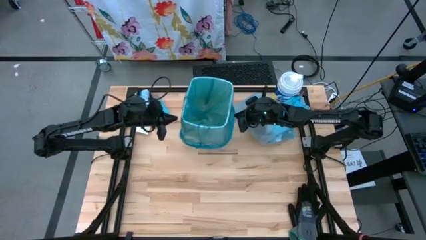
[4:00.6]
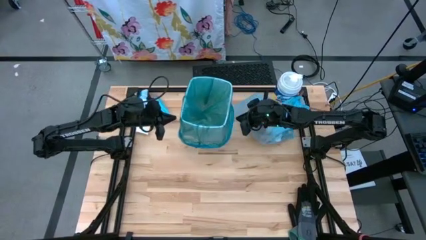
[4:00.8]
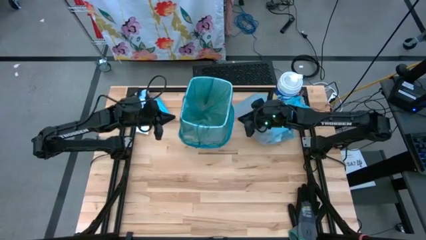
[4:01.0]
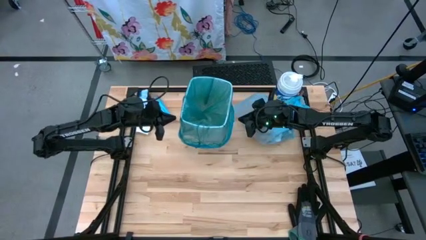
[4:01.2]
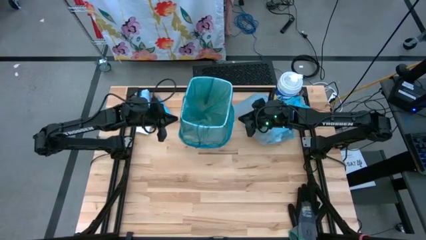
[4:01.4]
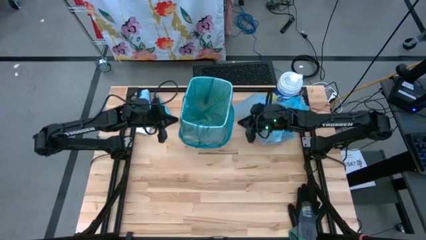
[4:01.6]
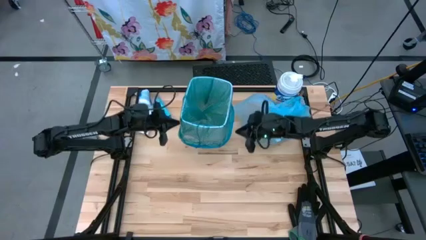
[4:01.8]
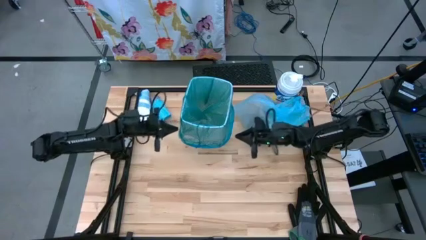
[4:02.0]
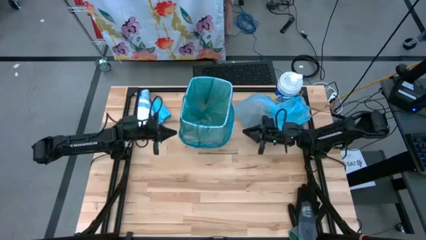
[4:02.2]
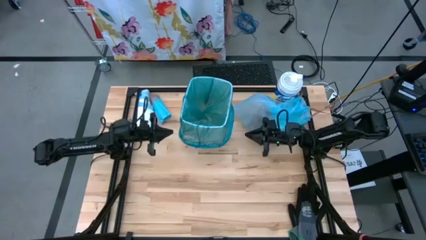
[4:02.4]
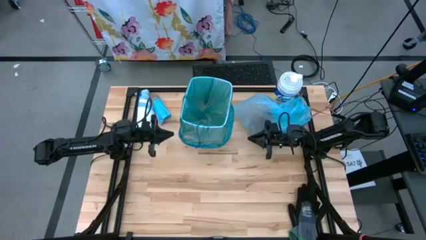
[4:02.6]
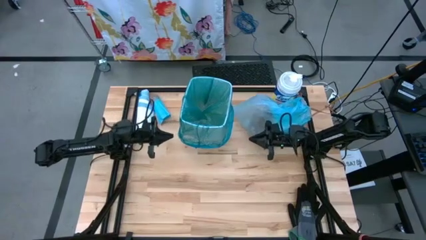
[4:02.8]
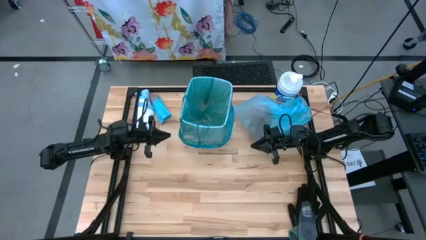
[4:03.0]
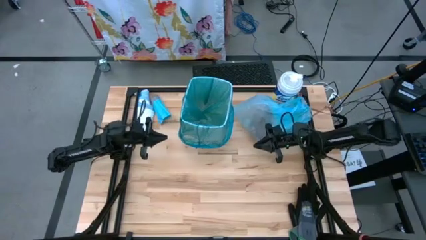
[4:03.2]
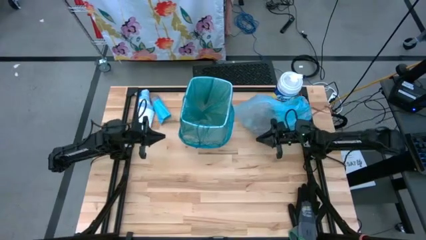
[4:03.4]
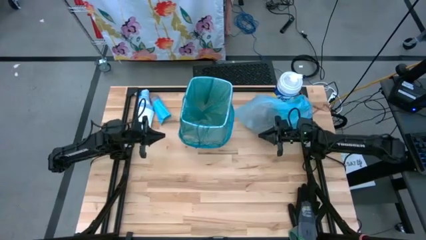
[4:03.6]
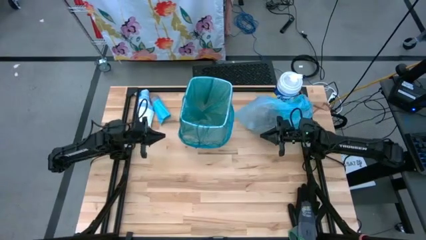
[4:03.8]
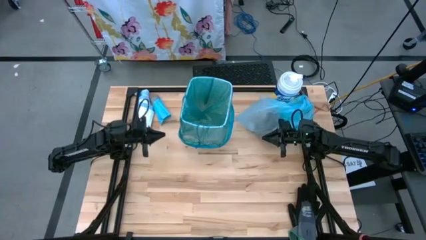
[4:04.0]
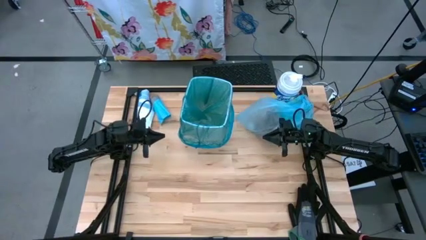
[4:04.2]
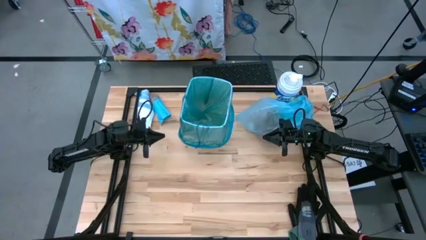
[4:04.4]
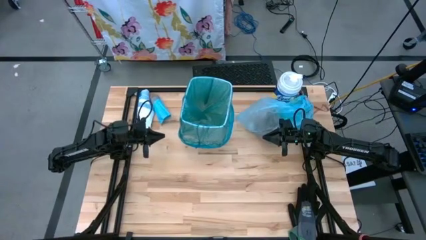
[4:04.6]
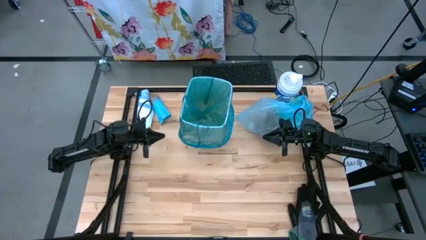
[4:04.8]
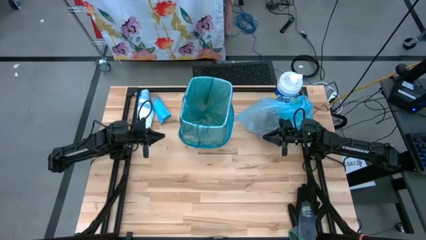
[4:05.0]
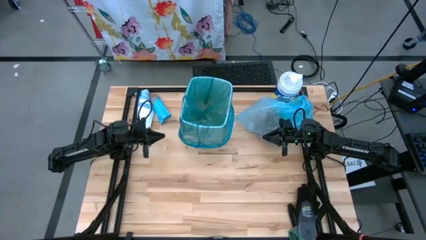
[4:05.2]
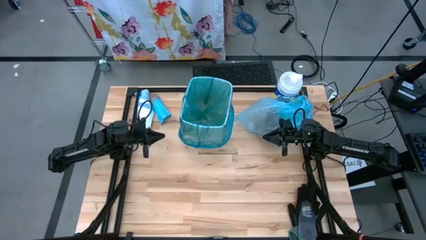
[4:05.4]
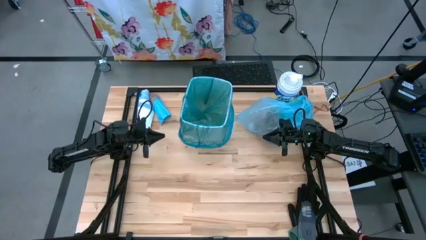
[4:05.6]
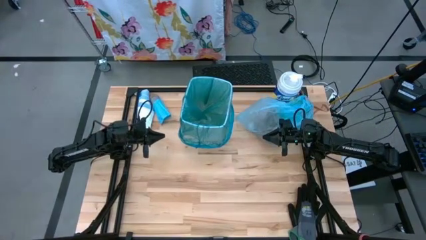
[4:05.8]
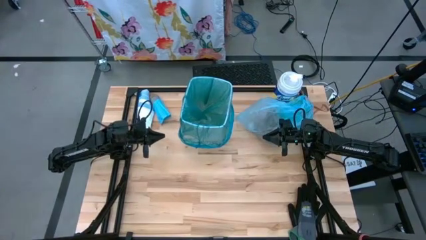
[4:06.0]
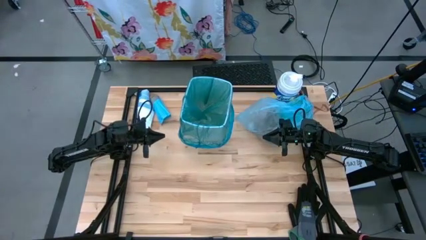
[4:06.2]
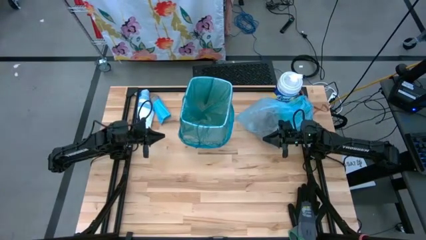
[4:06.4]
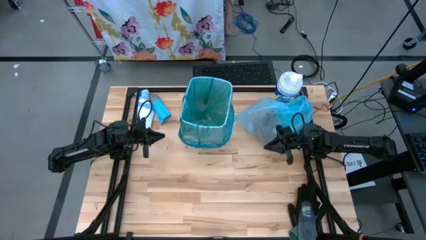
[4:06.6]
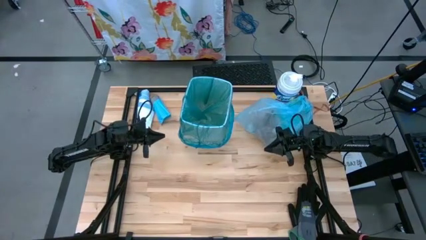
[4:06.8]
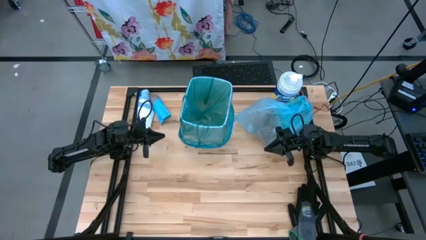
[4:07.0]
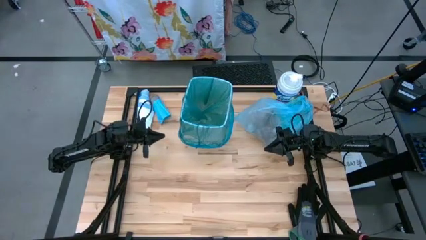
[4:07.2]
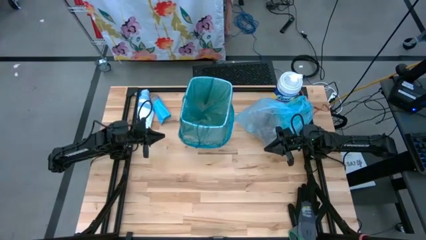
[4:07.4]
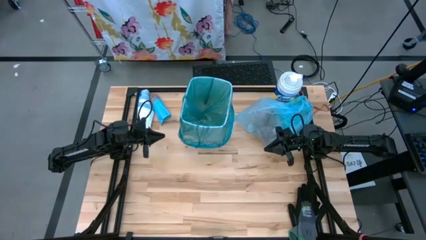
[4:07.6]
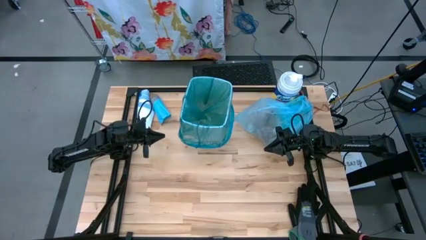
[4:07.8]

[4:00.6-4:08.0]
Task: place trash/remove bag and relplace
Return to Home Position
